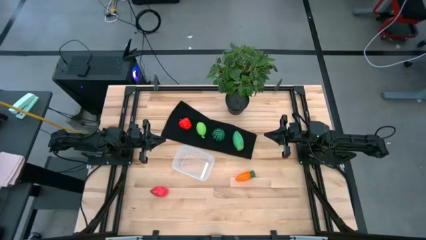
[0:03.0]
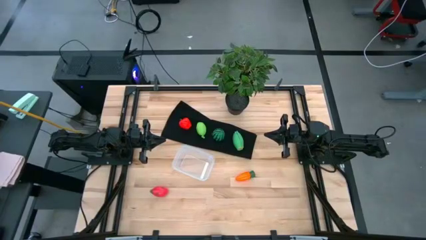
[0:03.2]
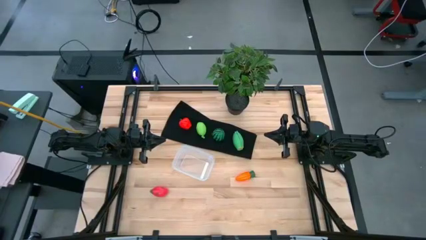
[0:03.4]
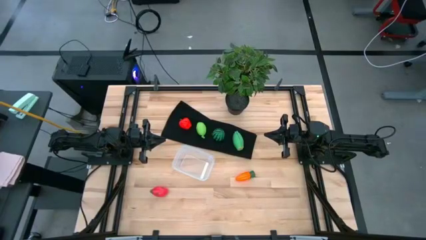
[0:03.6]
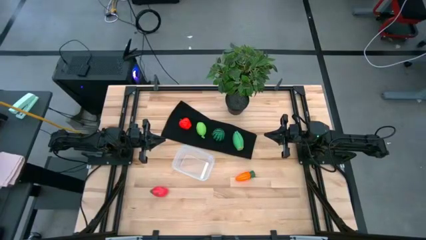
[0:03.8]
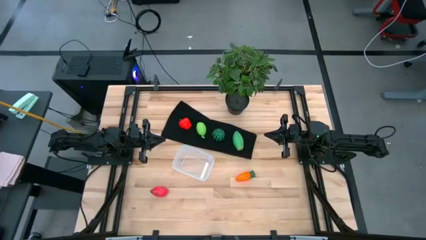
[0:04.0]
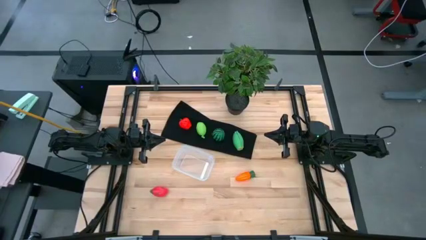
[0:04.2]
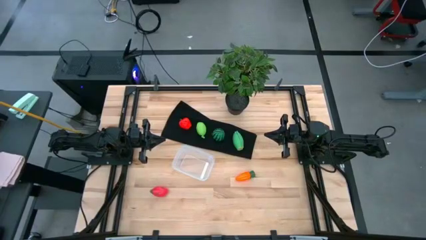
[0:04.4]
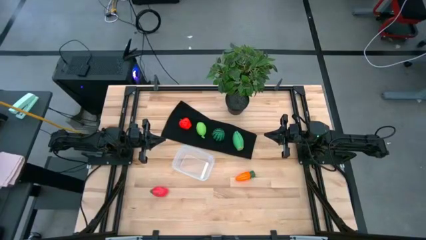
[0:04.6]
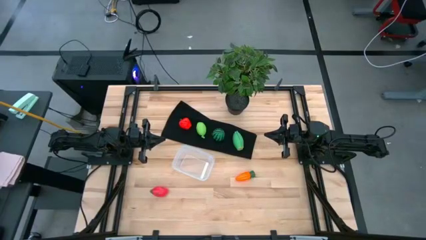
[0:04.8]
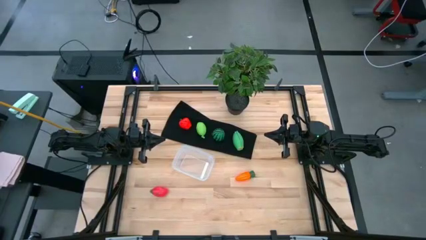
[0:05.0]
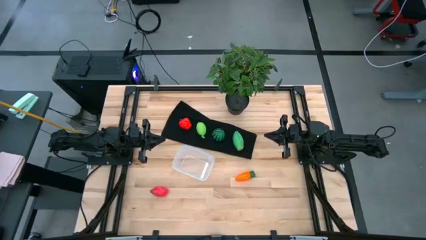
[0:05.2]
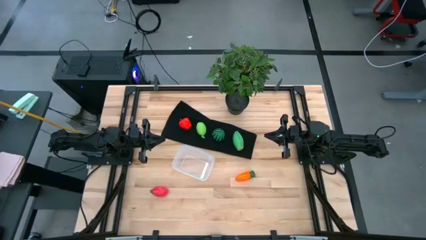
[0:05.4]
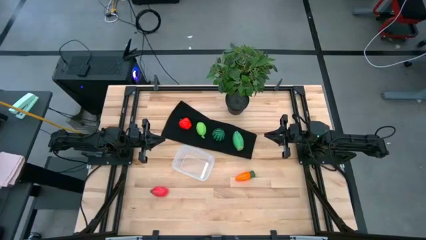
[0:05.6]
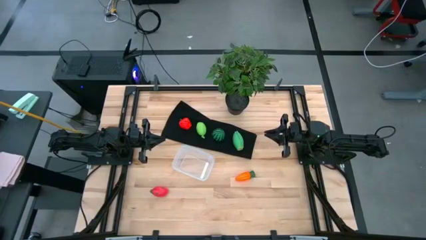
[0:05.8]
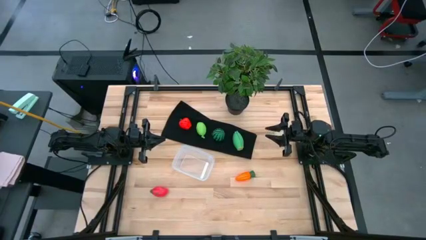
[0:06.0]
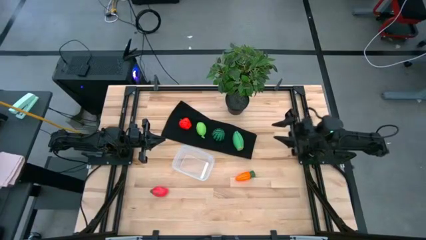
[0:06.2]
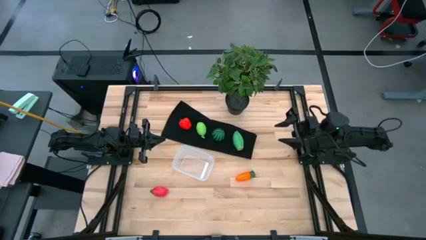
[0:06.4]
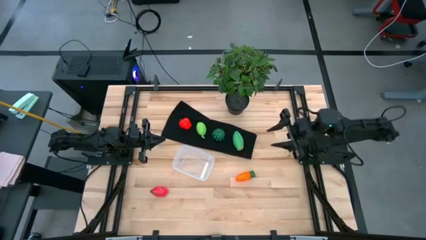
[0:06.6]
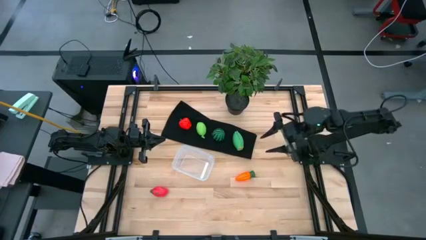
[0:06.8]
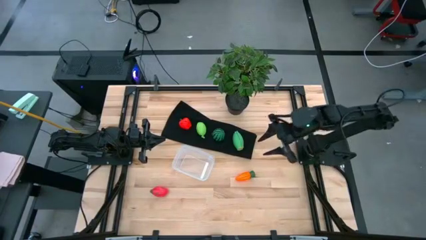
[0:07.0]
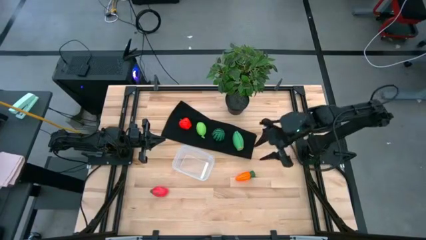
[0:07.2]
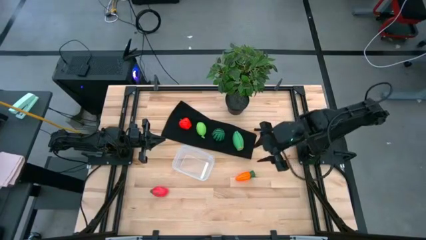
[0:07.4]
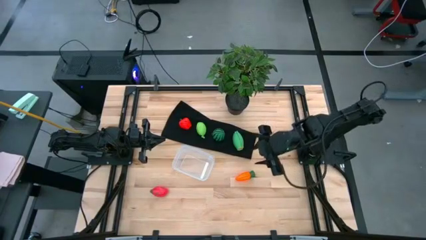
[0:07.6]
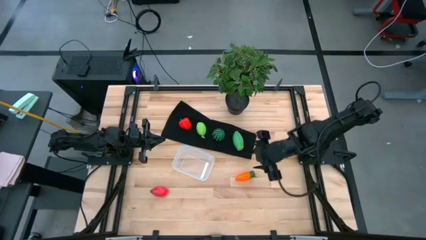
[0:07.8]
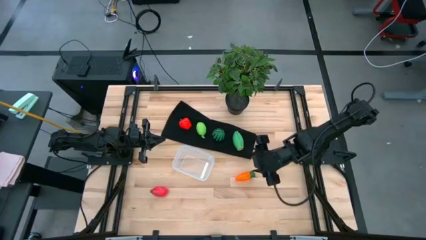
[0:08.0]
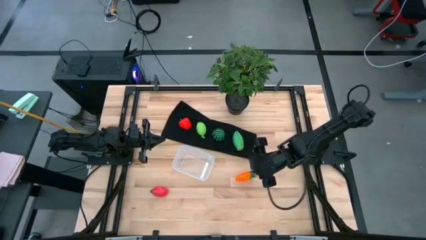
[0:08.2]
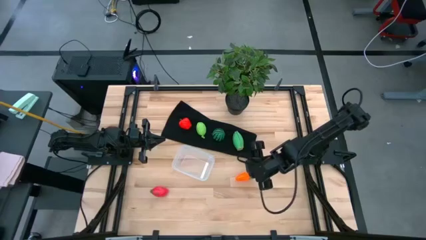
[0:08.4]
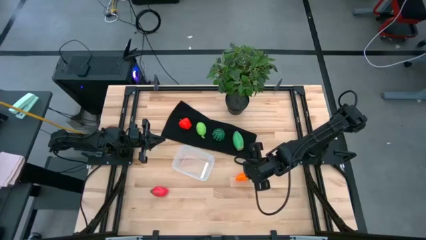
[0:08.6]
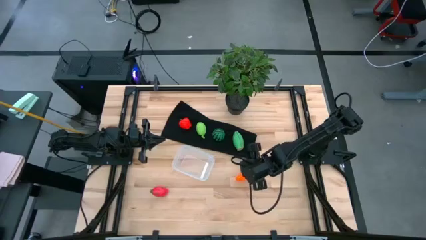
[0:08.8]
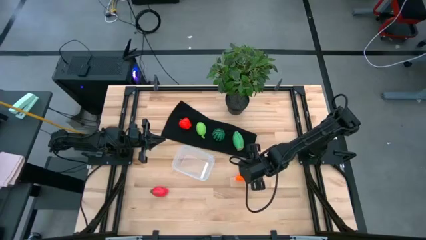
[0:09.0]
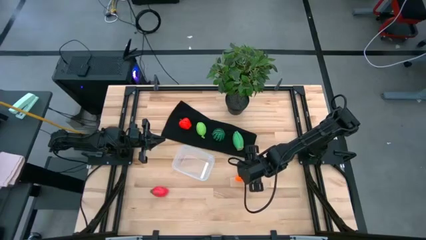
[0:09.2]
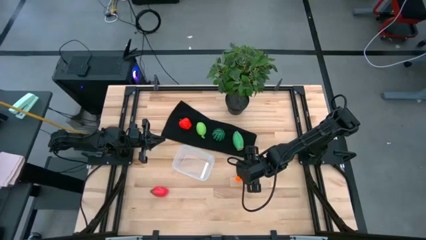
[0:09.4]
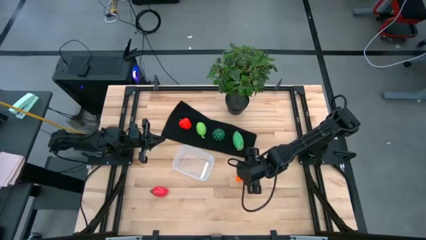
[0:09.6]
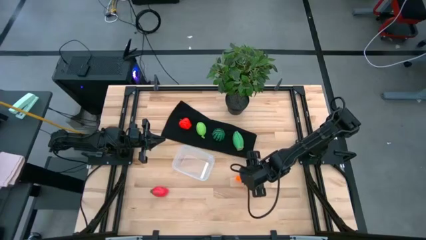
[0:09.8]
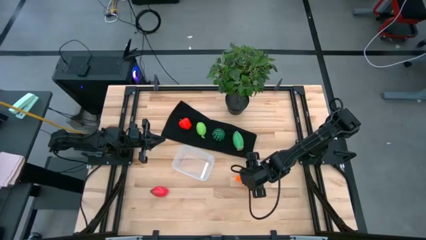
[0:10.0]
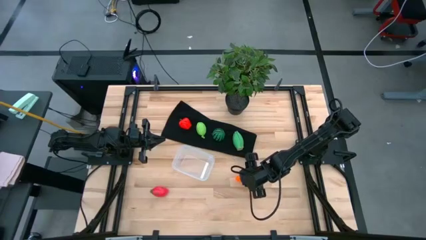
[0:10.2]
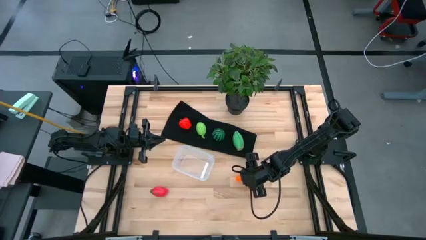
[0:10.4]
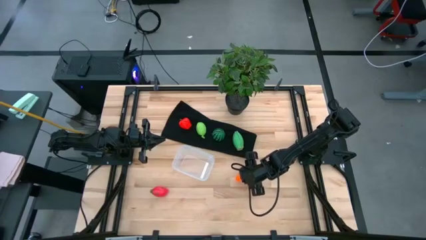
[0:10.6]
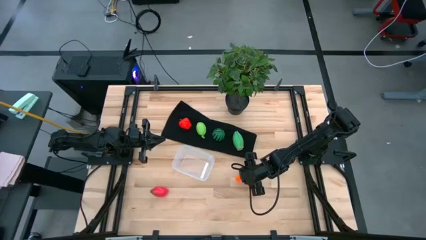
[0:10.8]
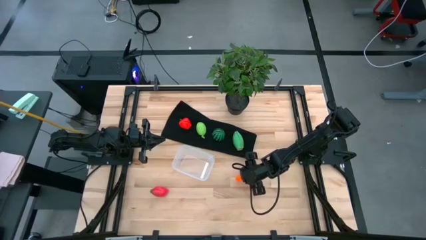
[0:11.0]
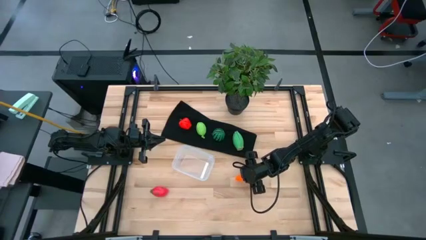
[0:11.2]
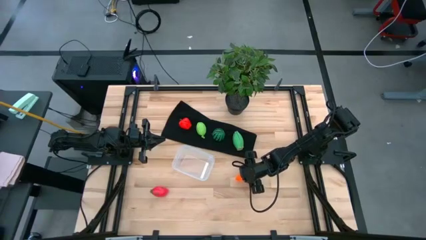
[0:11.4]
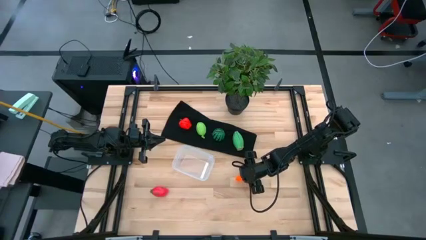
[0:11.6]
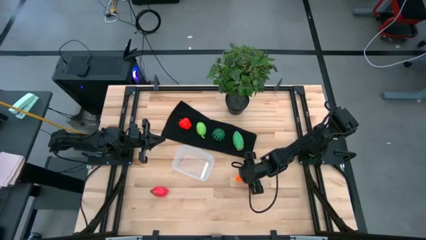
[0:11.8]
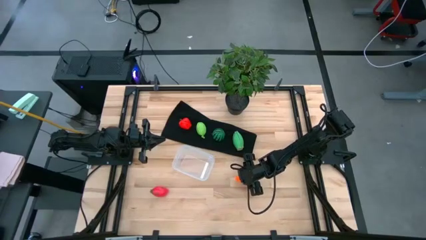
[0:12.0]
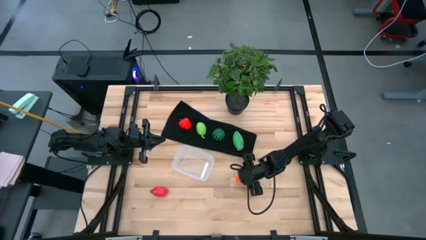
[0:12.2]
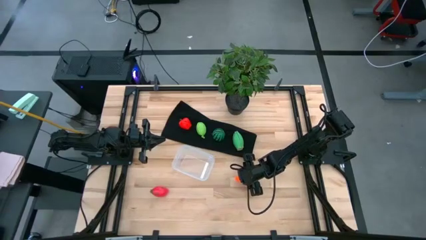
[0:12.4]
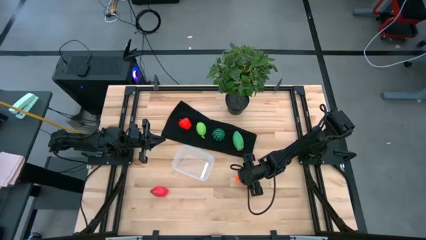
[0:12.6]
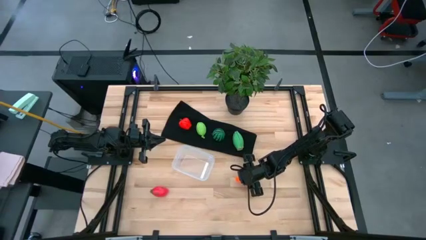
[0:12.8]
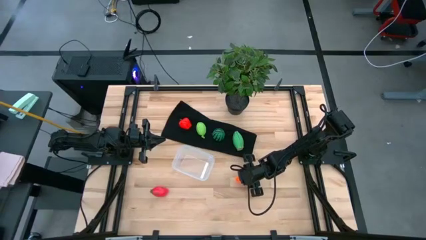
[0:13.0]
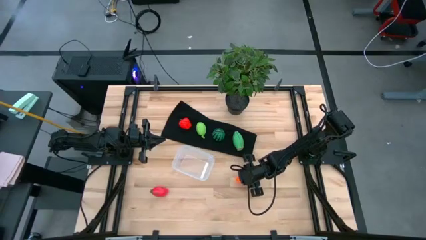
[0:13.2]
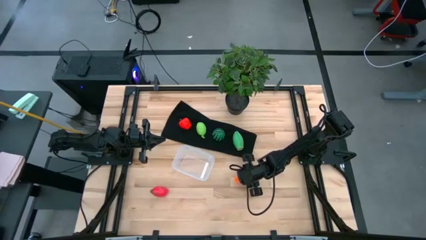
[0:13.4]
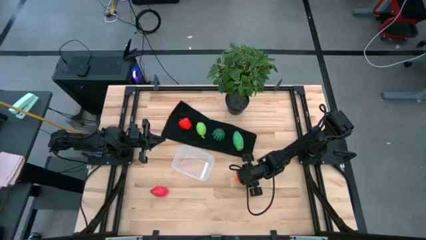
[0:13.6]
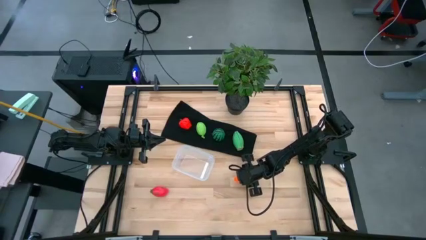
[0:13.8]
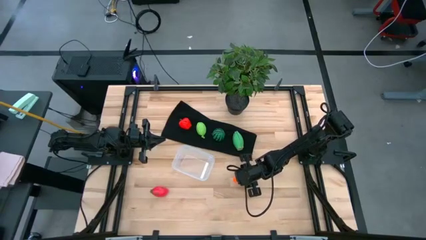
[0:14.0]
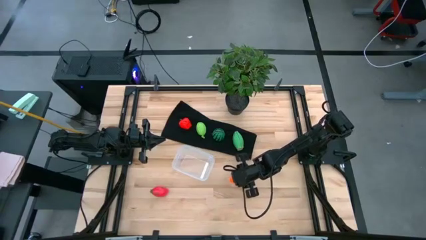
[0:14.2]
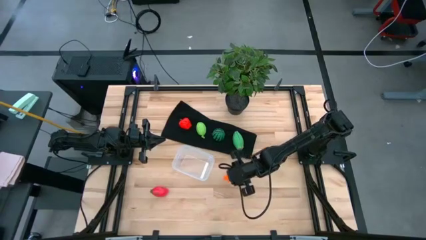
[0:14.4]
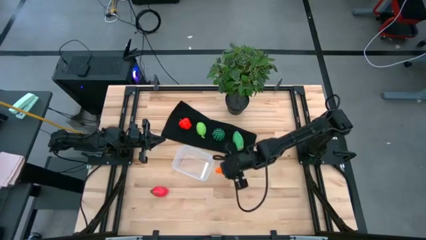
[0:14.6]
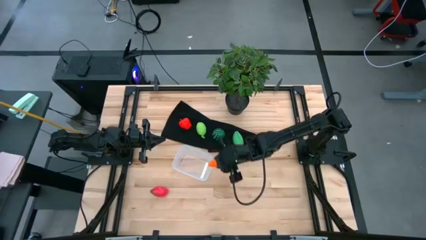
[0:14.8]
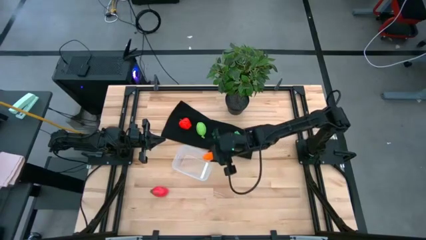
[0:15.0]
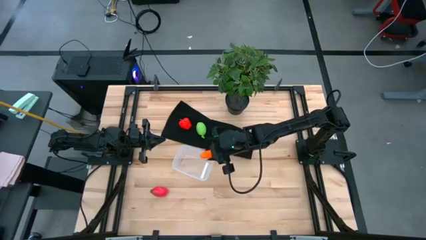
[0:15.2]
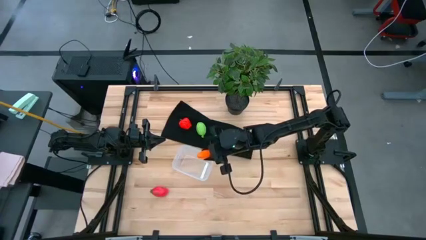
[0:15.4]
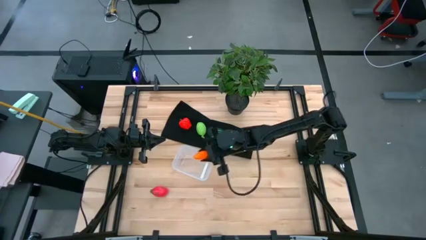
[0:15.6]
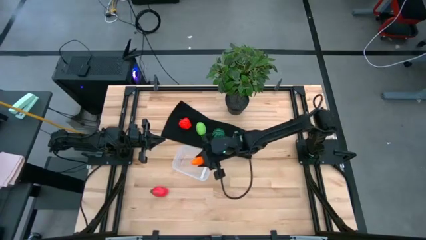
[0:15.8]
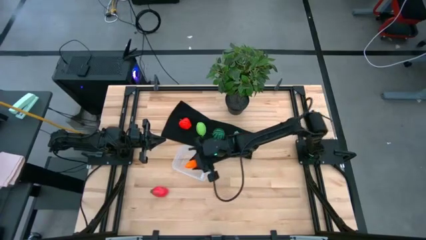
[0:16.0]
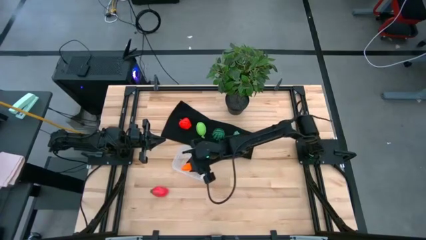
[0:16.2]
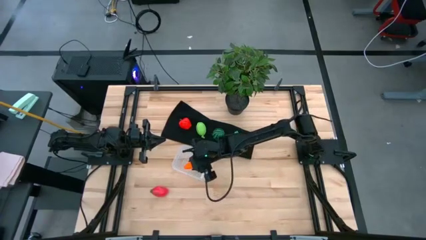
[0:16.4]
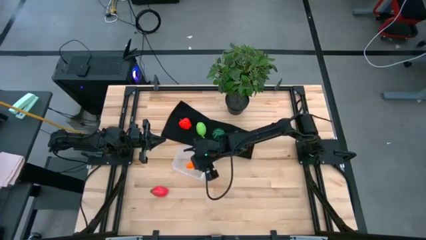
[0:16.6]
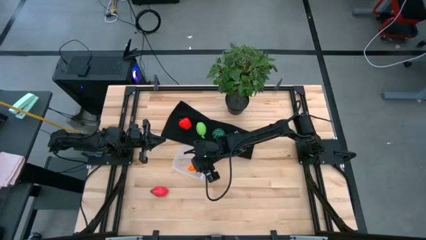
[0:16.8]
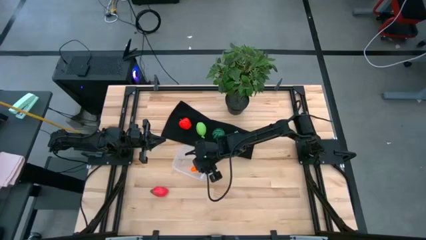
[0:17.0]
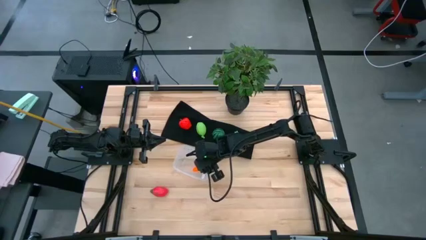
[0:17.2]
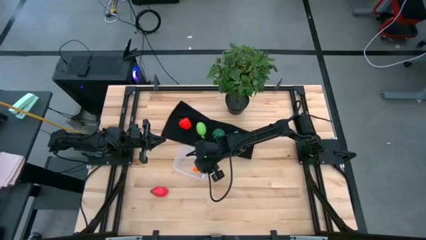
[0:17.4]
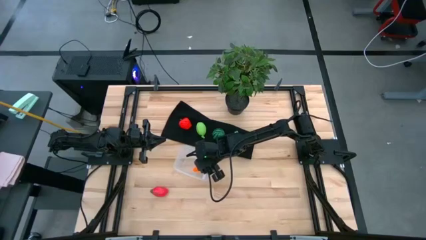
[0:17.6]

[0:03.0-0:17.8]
Task: Pick and placing Produce into tupperware
Put the orange carrot into the transparent bin
